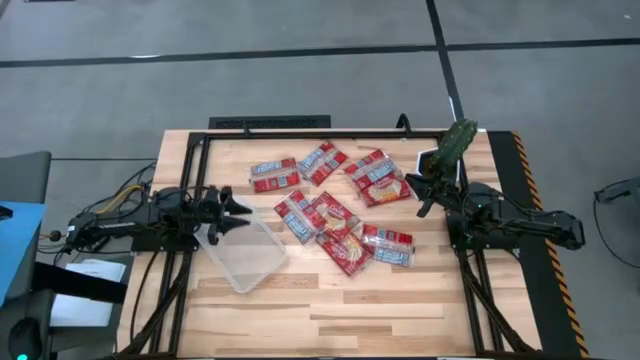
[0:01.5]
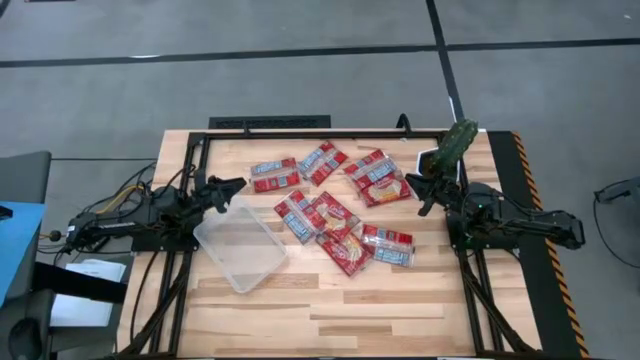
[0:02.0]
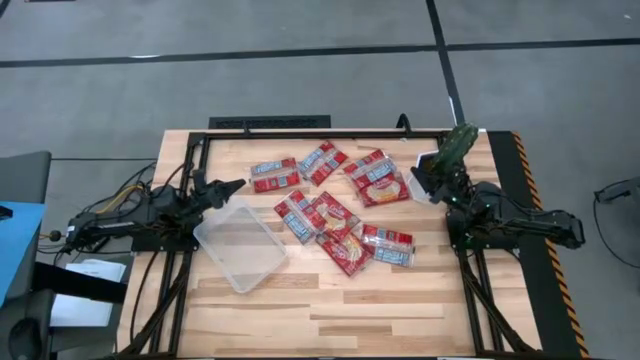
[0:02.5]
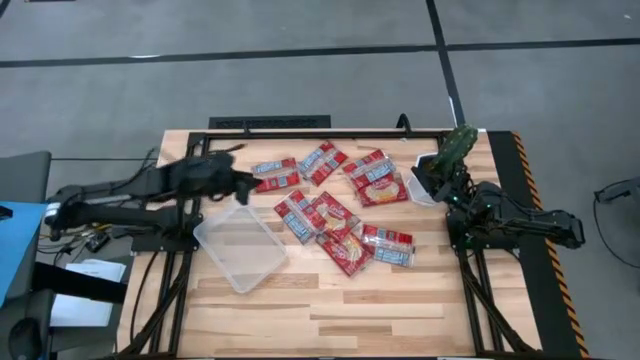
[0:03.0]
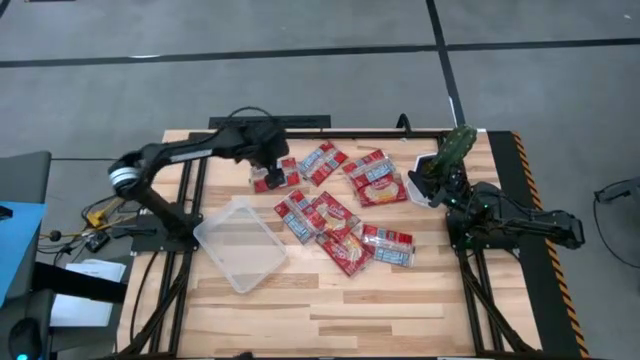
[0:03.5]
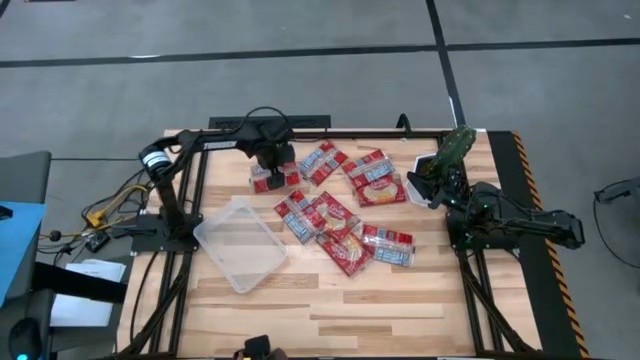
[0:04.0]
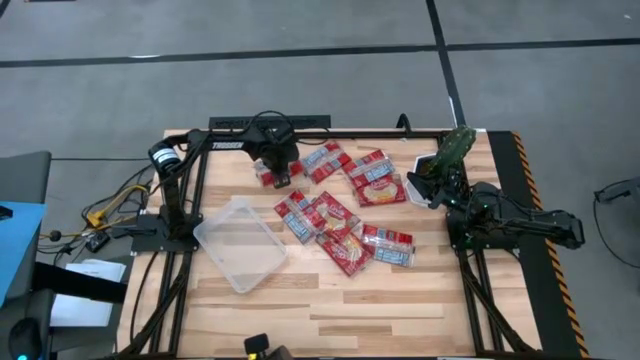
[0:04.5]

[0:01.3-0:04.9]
Task: Sort popcorn bags into baskets
Put the red popcorn bag into the transparent bin

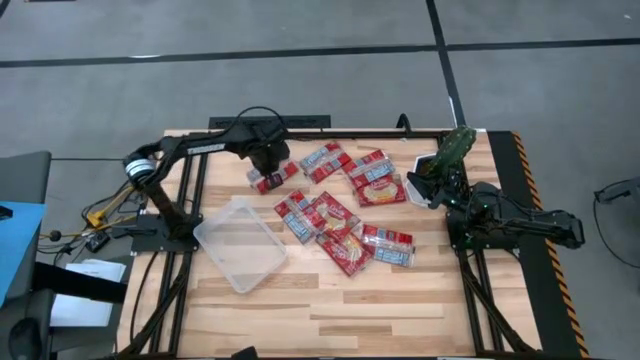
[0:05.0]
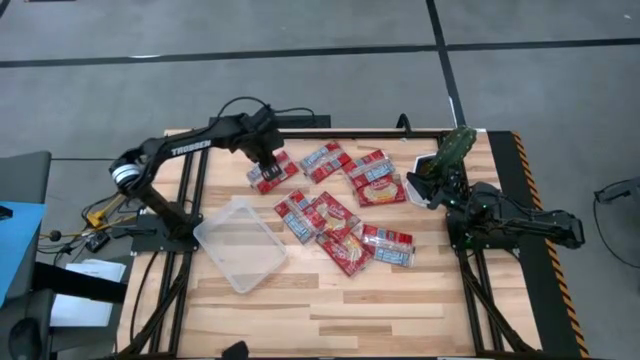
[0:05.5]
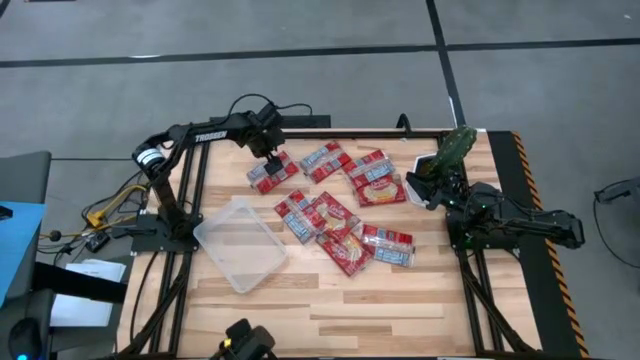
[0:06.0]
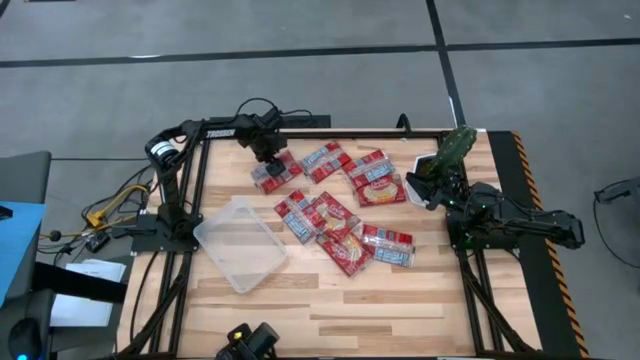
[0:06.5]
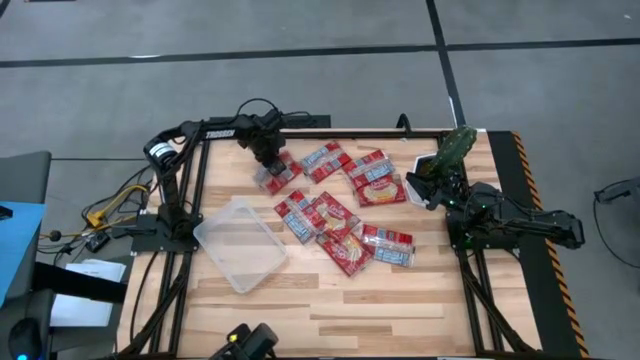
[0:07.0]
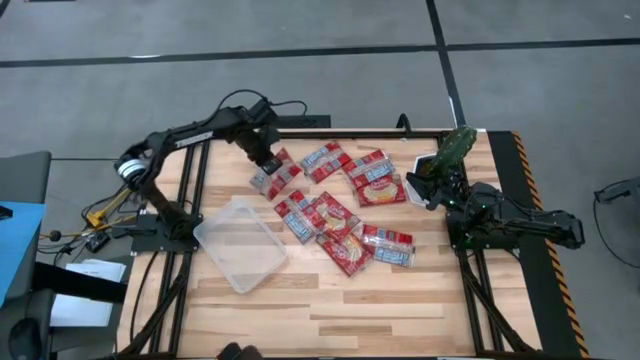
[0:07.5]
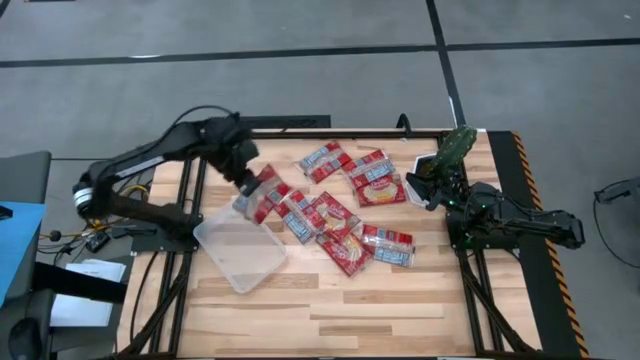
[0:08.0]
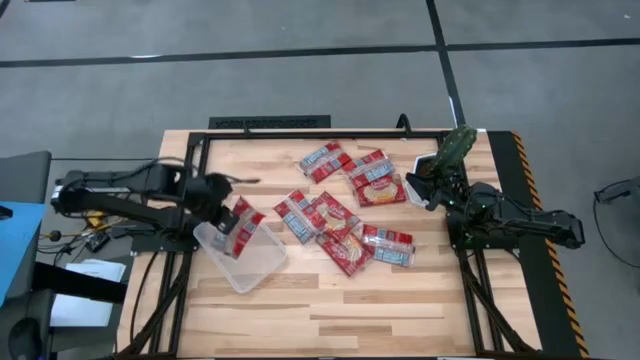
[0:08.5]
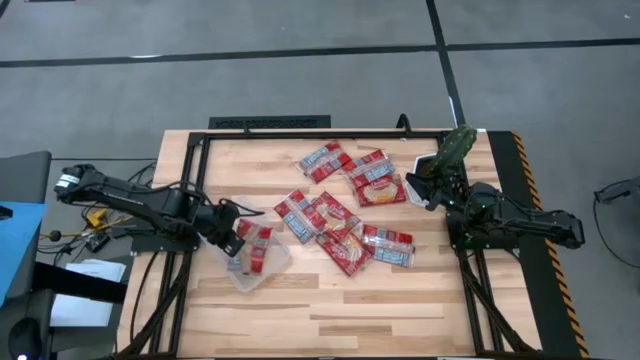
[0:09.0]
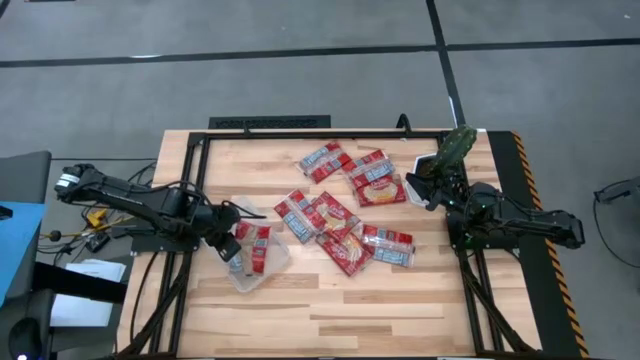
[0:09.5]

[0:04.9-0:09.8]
Put the red popcorn bag into the transparent bin

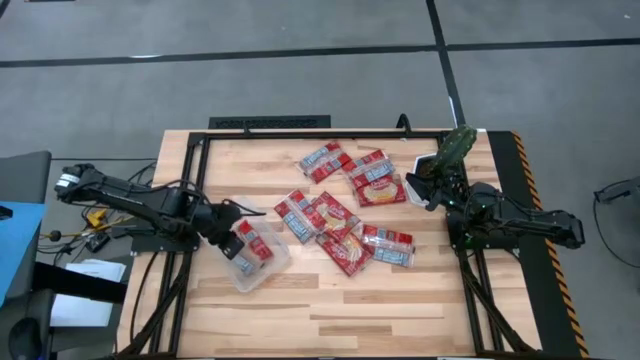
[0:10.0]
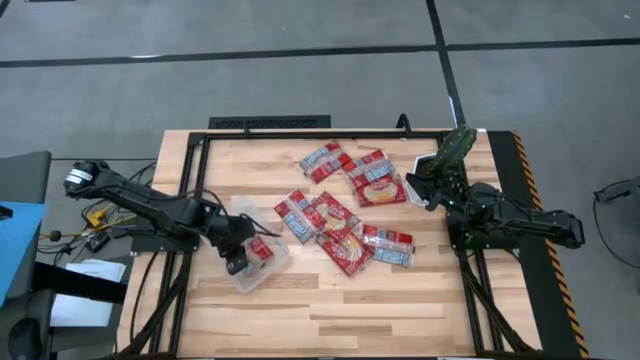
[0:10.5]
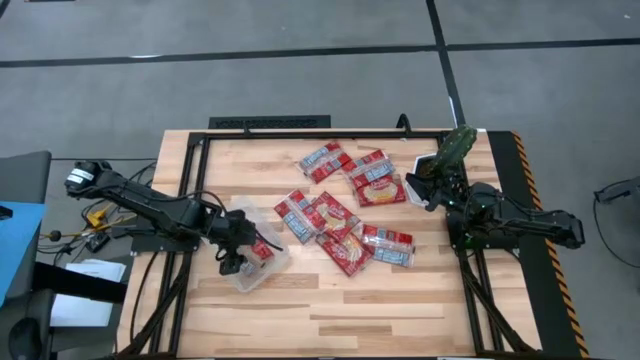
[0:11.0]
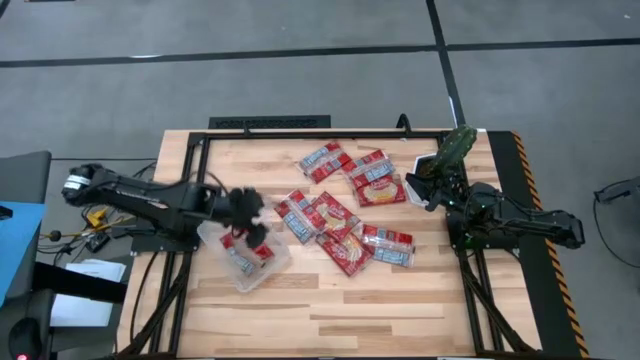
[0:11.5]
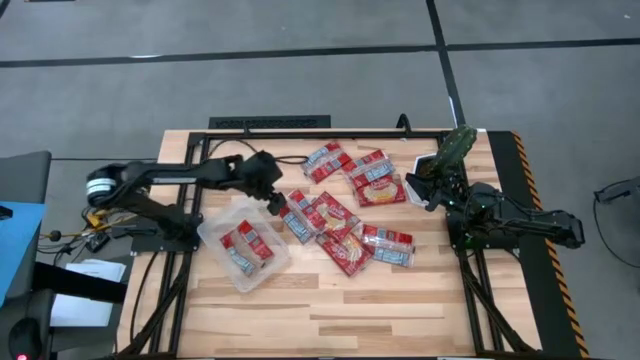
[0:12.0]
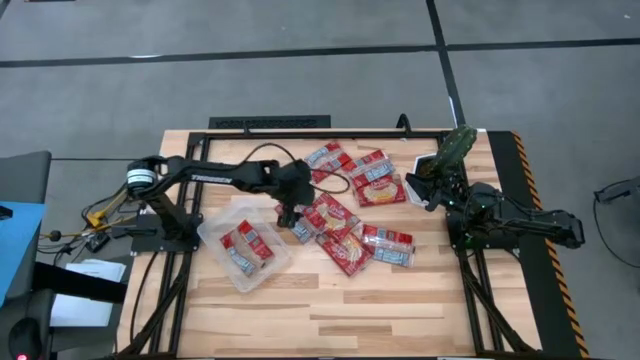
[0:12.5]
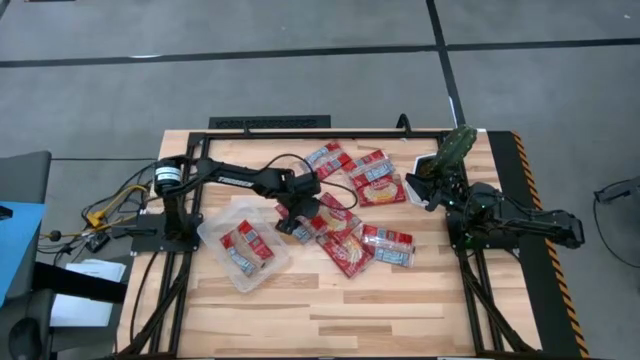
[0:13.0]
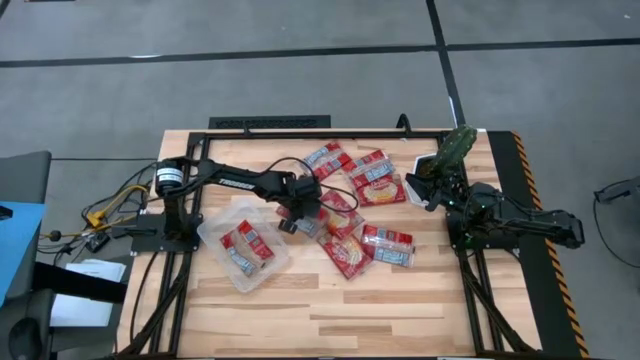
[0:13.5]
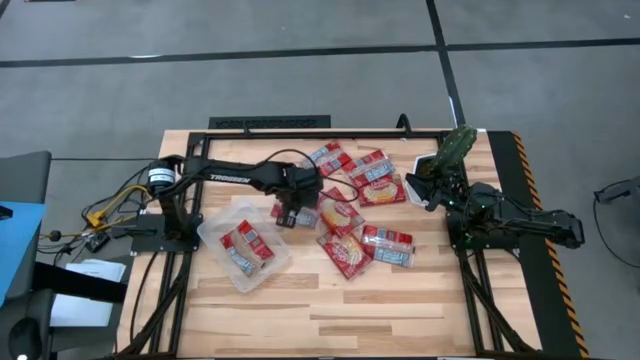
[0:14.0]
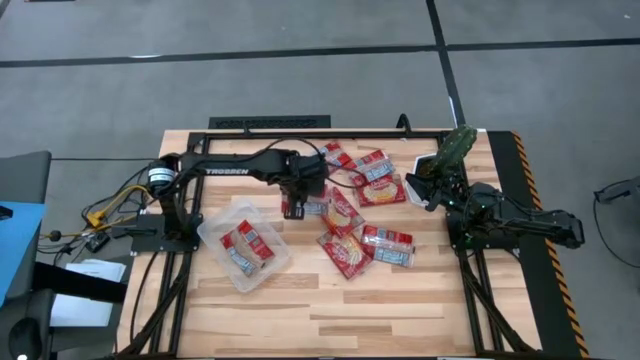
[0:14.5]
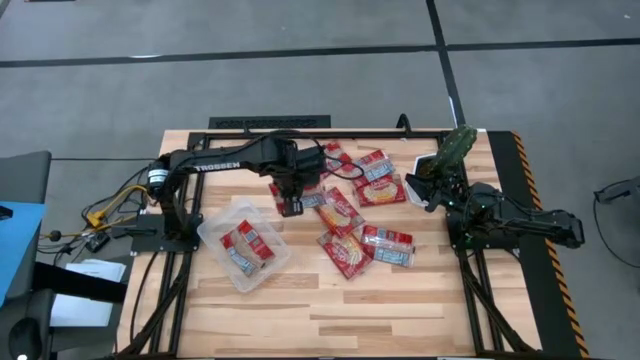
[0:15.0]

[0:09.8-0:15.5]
Put the red popcorn bag into the transparent bin

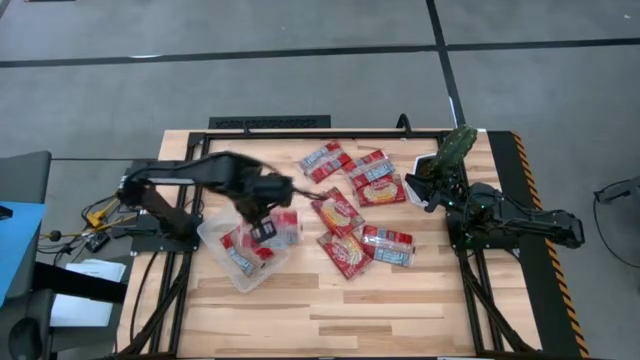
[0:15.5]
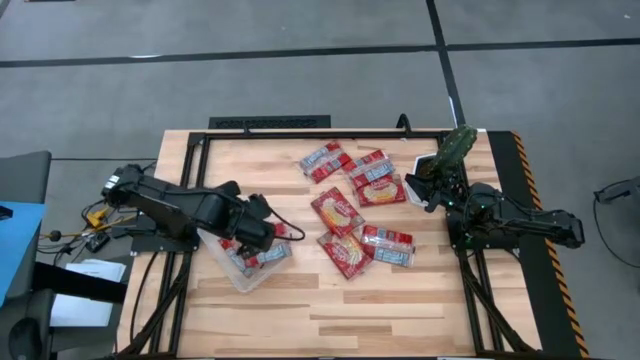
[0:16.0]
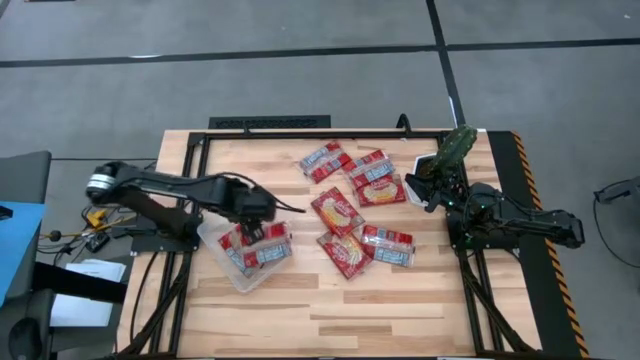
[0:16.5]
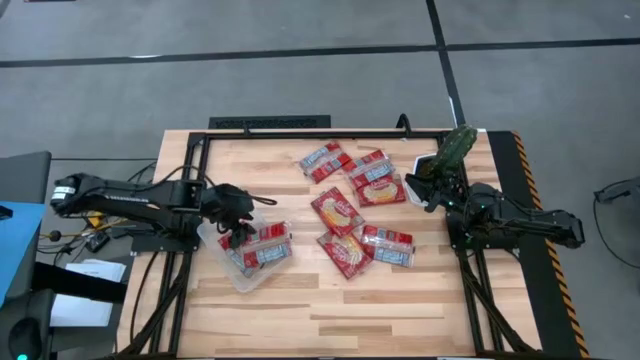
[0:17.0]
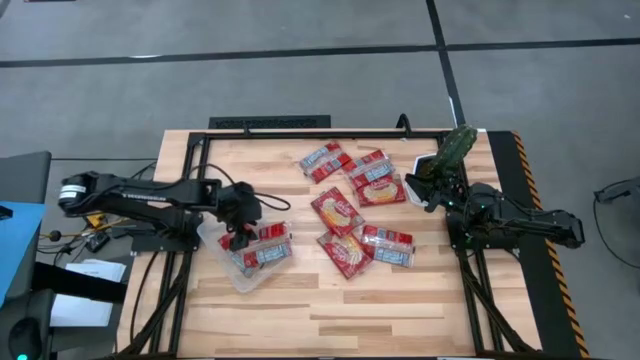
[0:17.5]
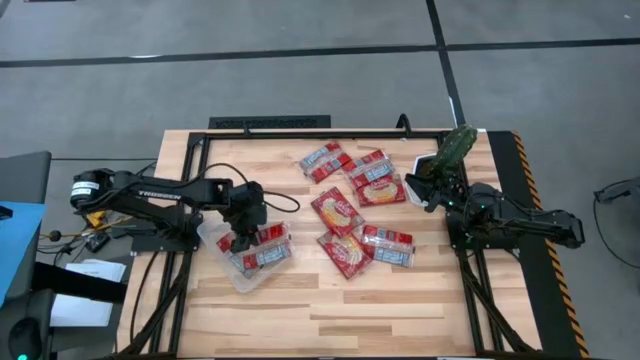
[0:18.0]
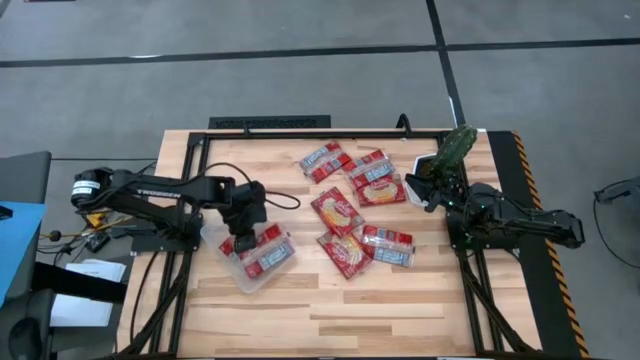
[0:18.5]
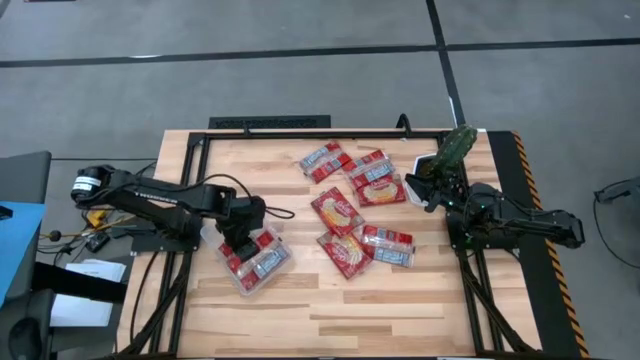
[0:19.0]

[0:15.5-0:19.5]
Put the red popcorn bag into the transparent bin

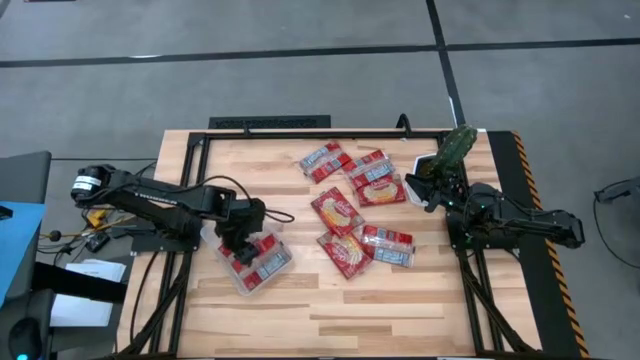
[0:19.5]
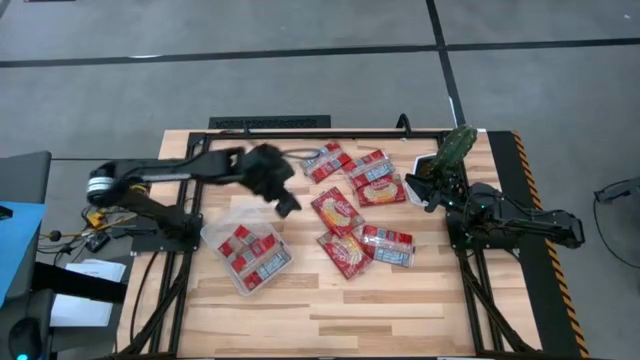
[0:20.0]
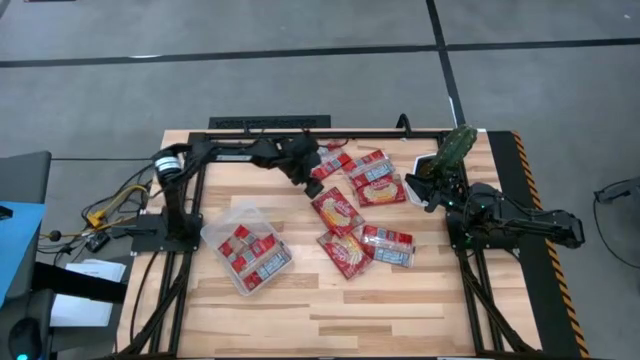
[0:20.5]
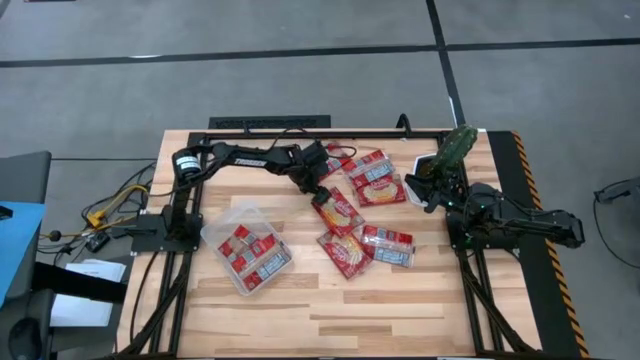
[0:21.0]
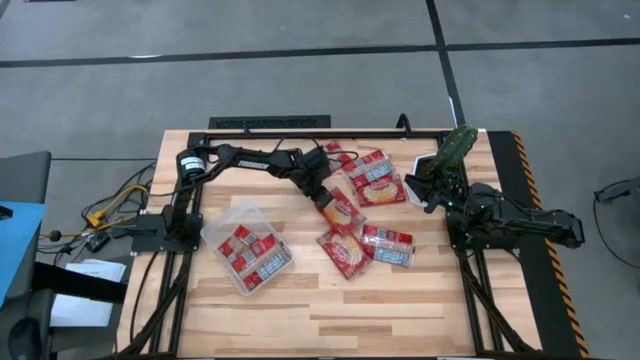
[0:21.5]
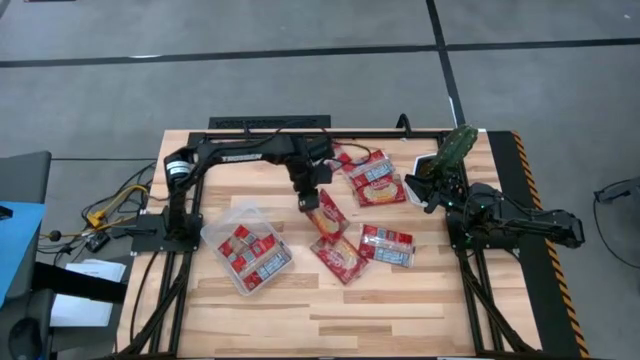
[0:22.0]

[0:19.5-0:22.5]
Put the red popcorn bag into the transparent bin

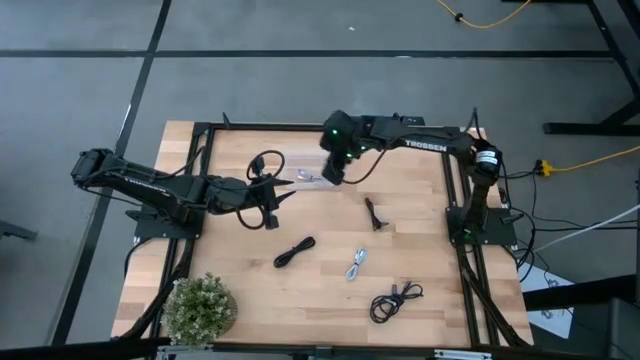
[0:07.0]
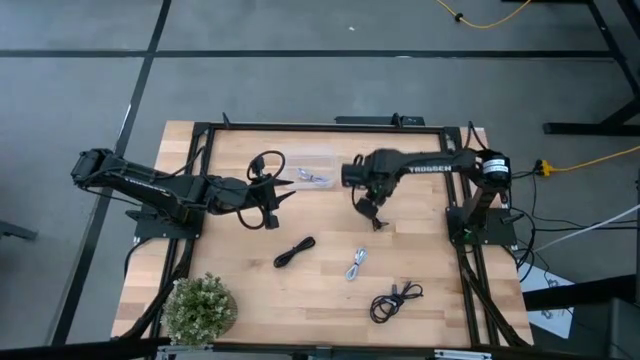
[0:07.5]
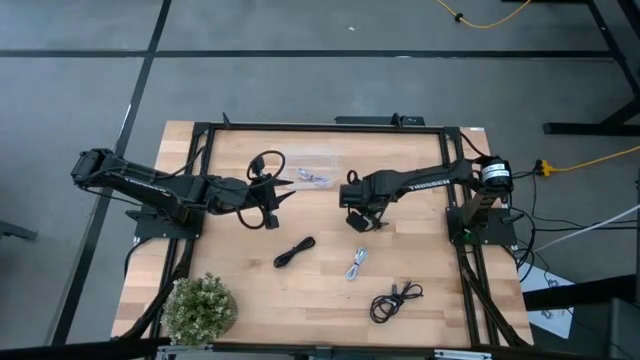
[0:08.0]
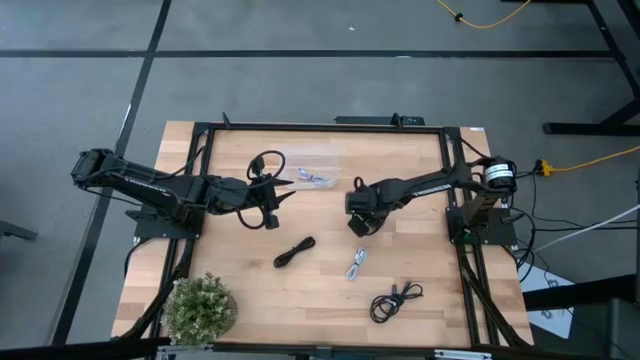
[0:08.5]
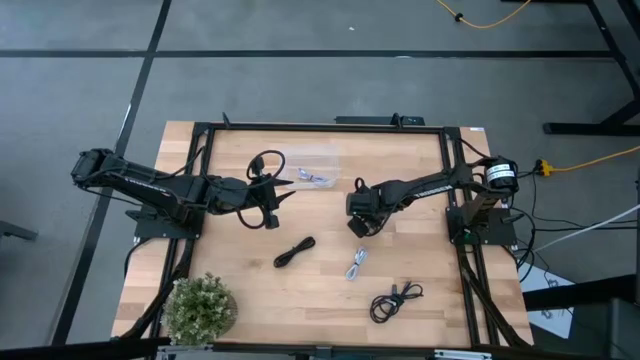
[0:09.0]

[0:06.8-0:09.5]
Task: Pick and place USB-C Cables
Put the top right black charger cable into the transparent bin
